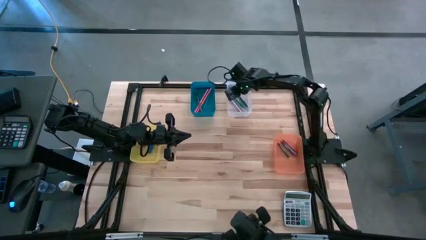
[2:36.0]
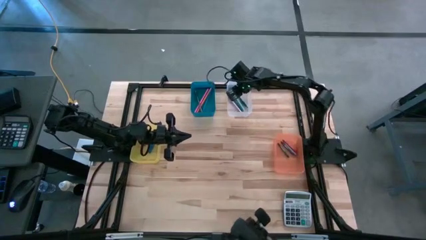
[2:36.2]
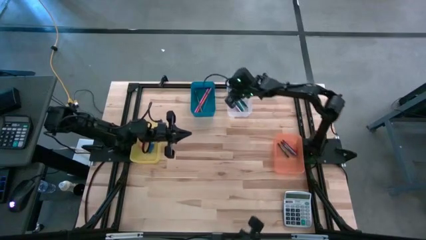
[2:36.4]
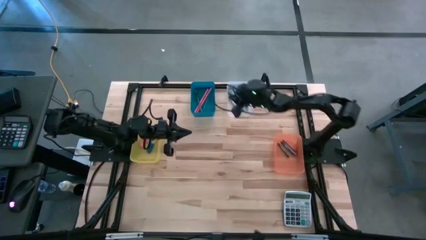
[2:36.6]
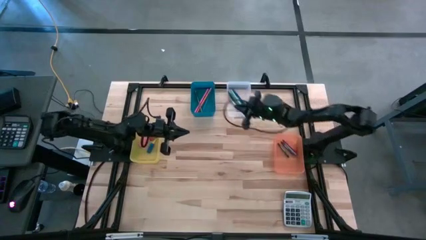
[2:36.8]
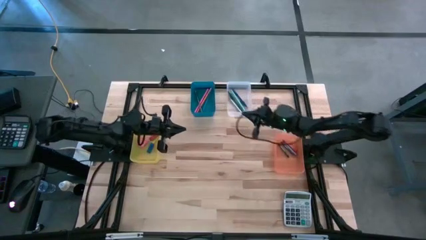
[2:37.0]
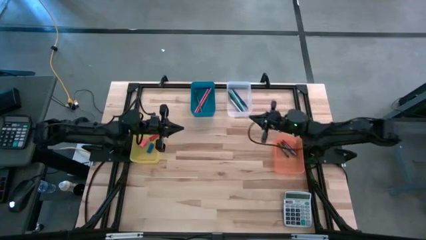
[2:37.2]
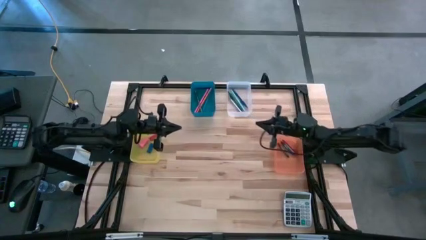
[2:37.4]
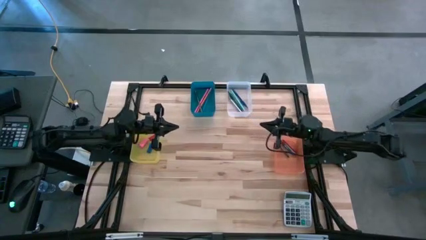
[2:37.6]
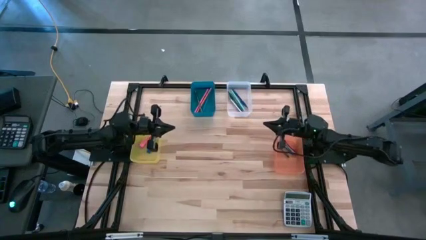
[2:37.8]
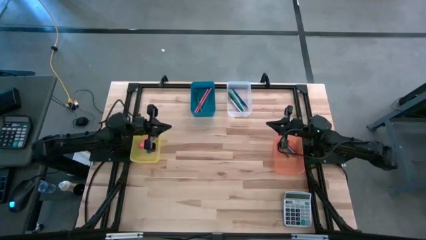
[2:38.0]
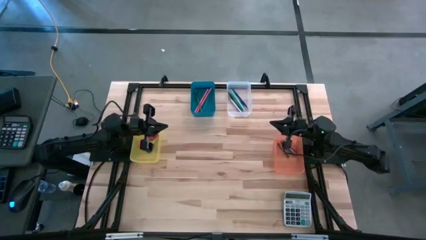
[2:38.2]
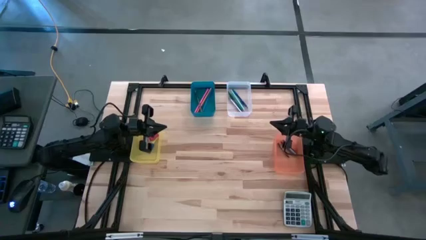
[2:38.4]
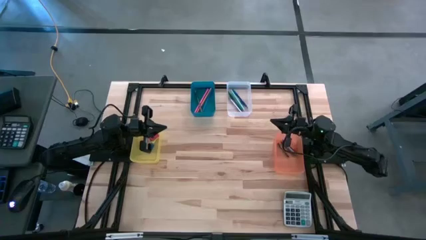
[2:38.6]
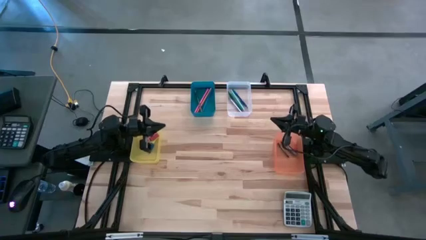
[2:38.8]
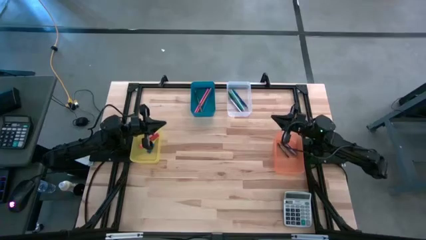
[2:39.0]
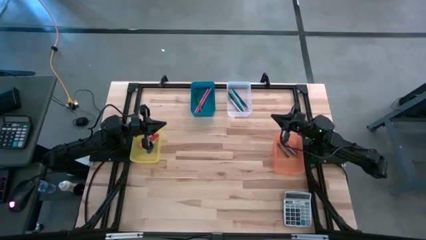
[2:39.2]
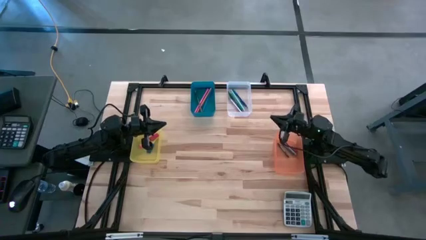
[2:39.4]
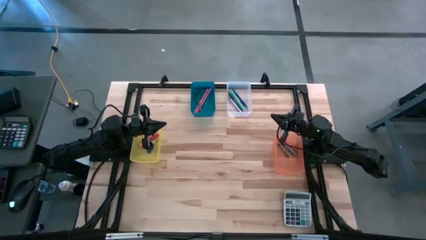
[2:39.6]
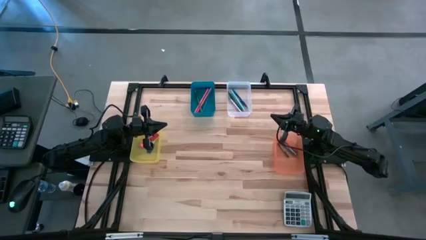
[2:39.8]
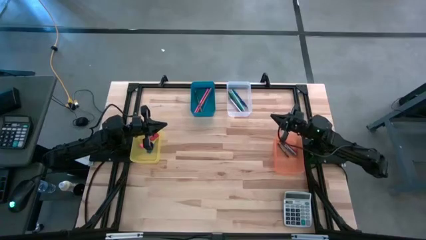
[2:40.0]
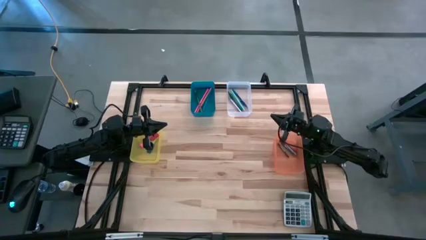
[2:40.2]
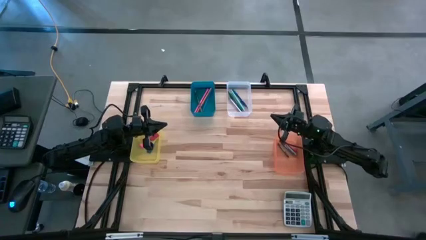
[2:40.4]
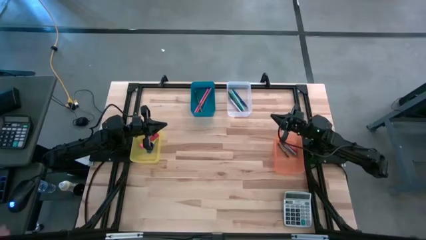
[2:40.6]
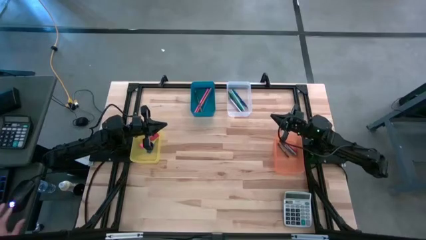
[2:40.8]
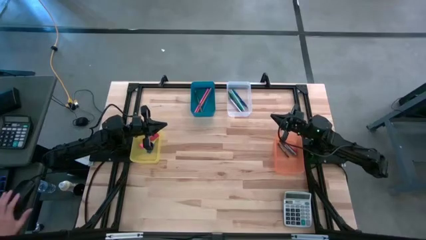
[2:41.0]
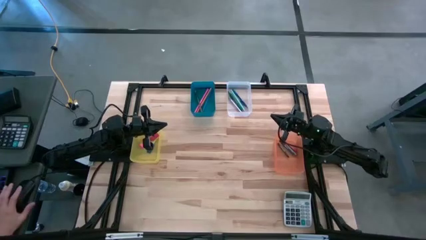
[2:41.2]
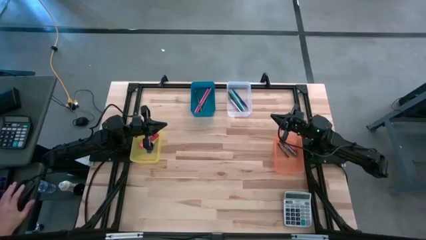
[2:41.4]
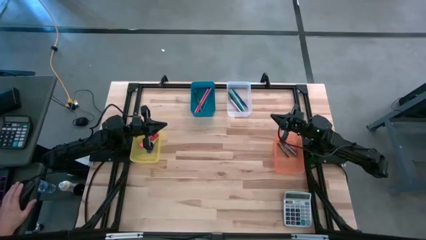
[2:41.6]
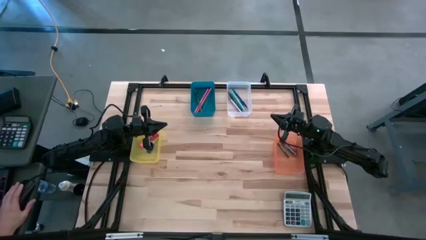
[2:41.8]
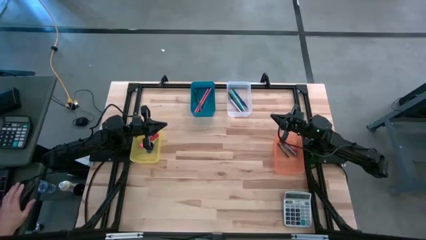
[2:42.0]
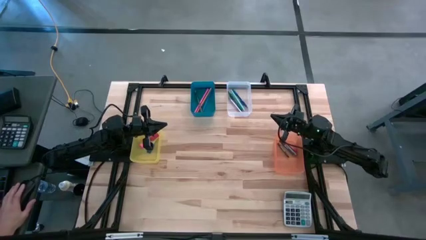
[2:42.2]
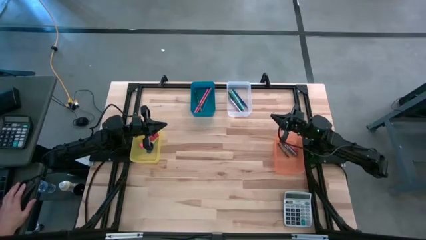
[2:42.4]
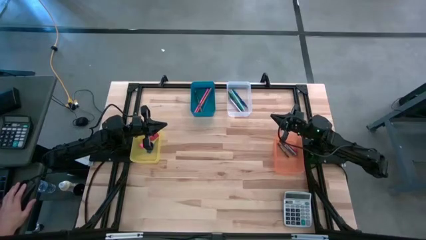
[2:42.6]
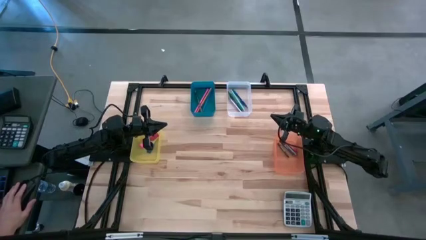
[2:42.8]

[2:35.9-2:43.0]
Task: Sort crayons/erasers/pens/pencils in bins
Return to Home Position

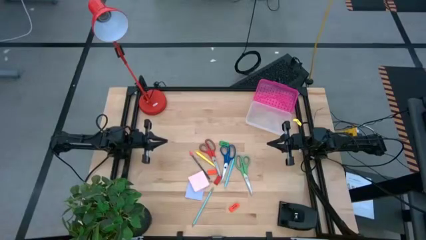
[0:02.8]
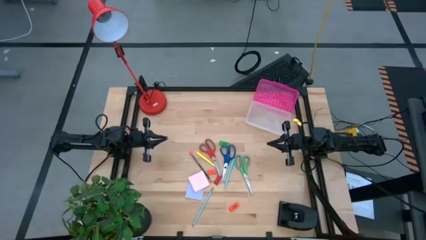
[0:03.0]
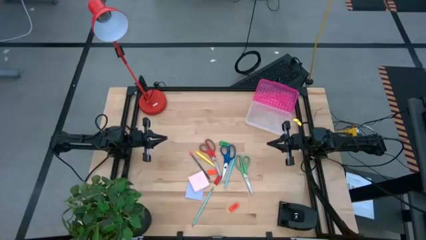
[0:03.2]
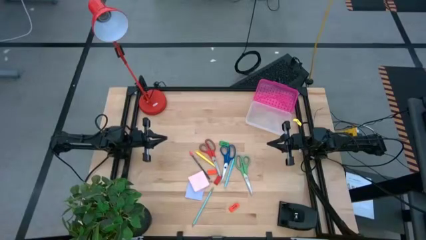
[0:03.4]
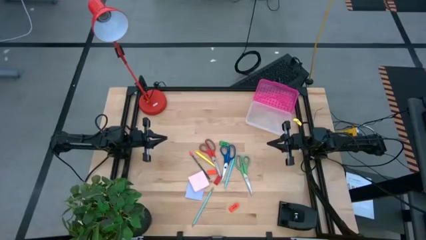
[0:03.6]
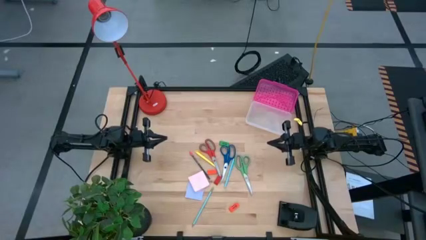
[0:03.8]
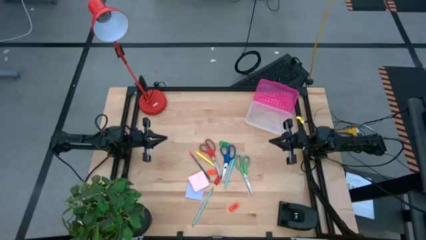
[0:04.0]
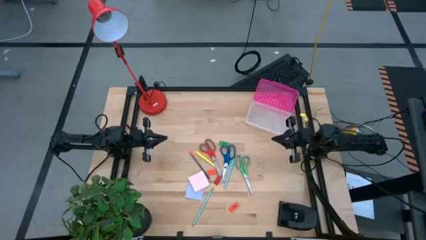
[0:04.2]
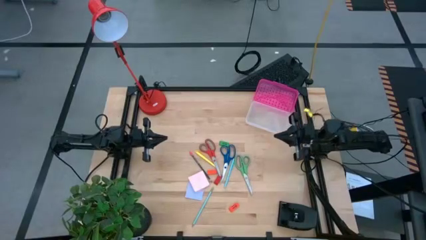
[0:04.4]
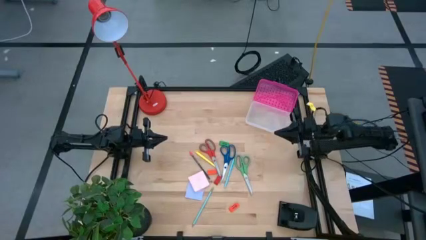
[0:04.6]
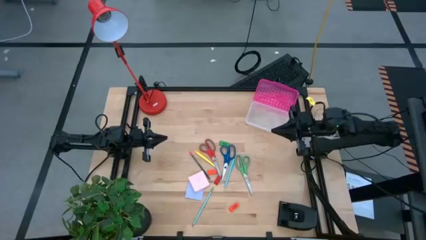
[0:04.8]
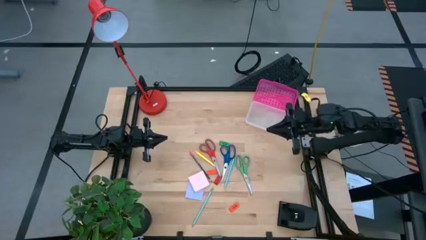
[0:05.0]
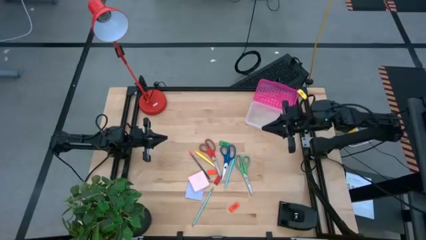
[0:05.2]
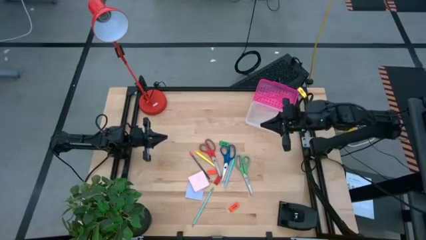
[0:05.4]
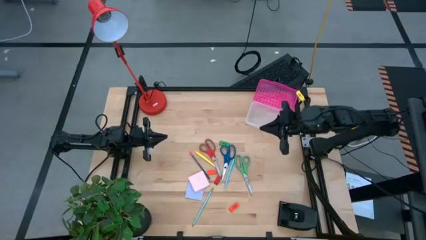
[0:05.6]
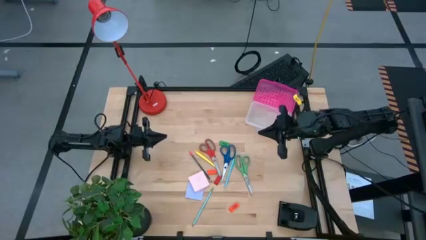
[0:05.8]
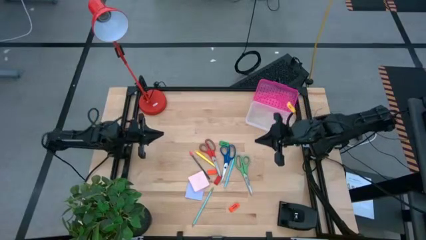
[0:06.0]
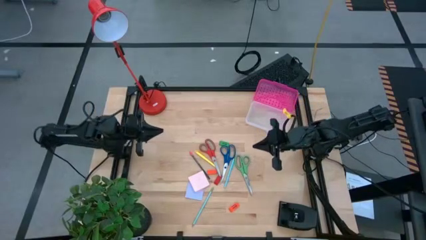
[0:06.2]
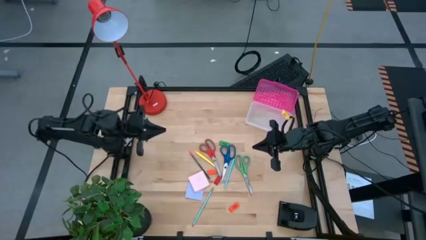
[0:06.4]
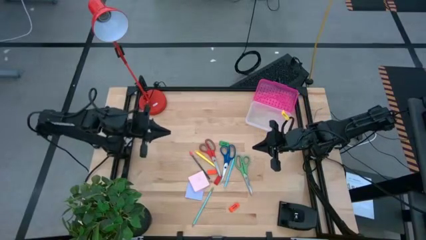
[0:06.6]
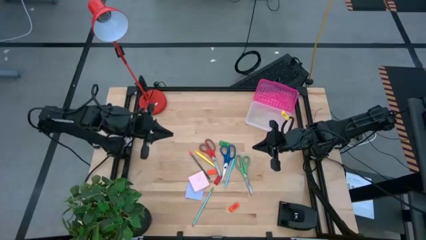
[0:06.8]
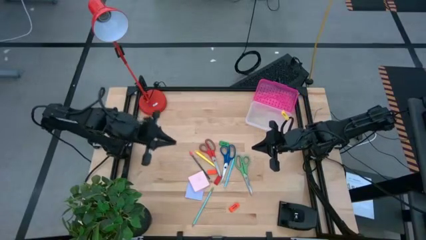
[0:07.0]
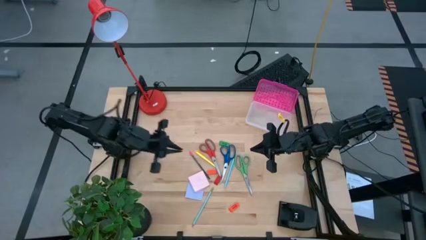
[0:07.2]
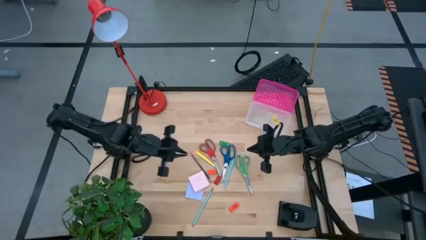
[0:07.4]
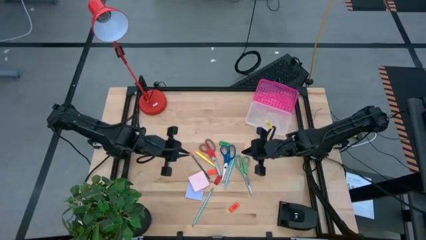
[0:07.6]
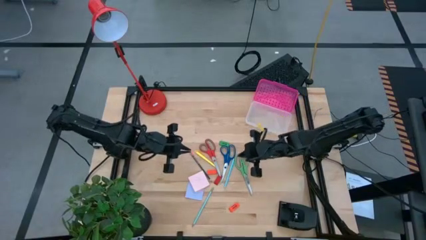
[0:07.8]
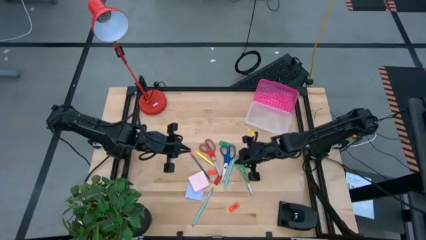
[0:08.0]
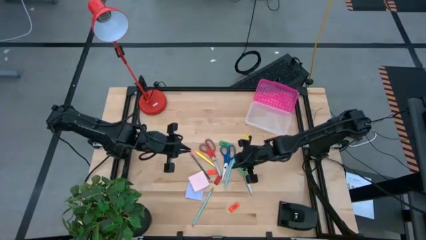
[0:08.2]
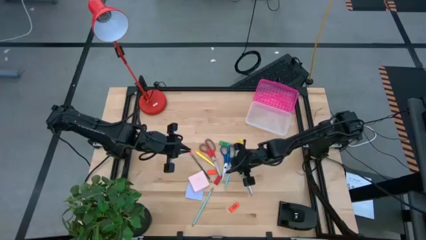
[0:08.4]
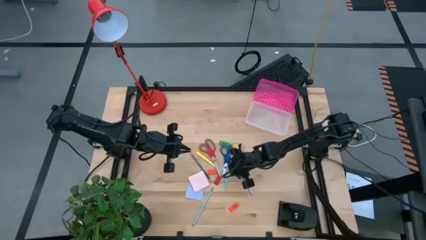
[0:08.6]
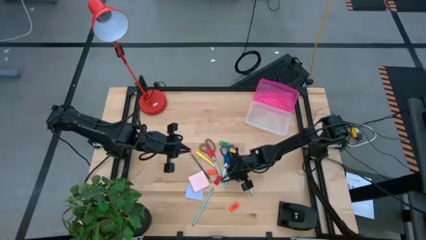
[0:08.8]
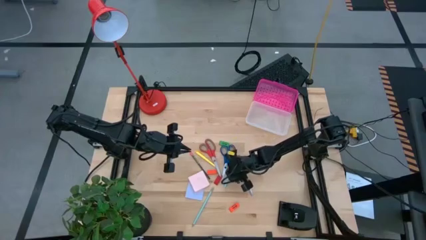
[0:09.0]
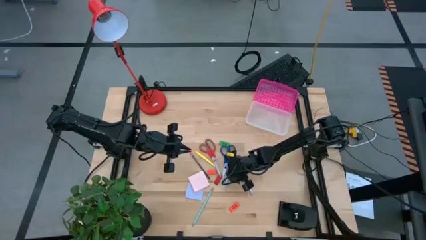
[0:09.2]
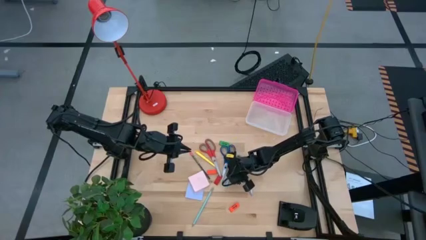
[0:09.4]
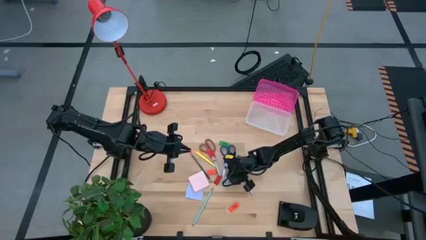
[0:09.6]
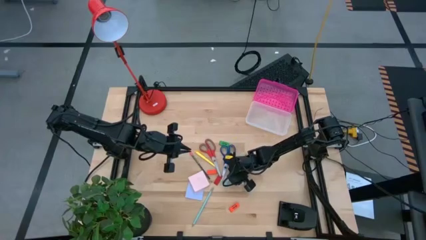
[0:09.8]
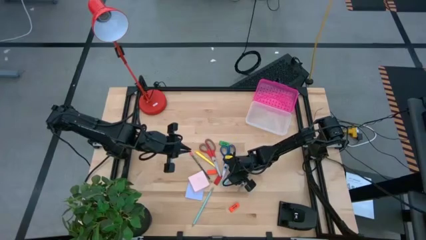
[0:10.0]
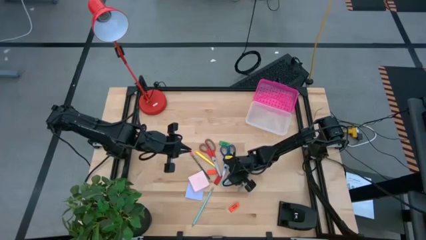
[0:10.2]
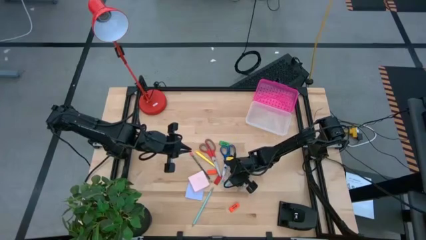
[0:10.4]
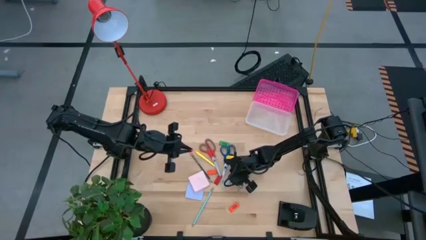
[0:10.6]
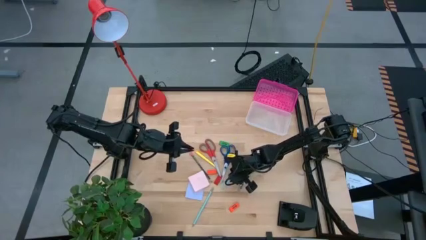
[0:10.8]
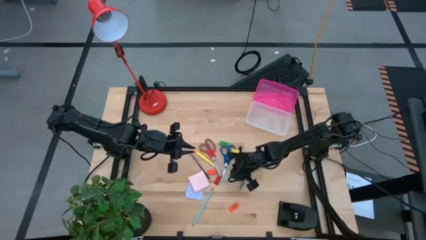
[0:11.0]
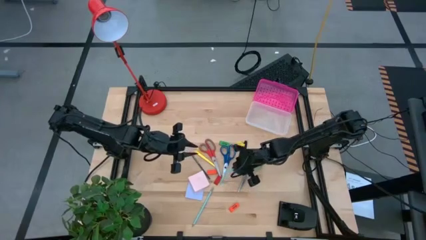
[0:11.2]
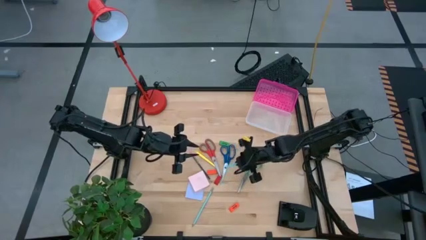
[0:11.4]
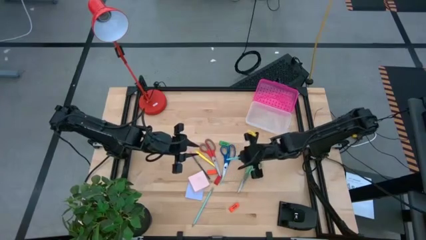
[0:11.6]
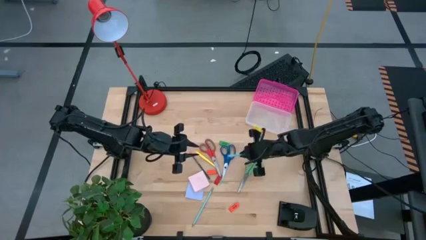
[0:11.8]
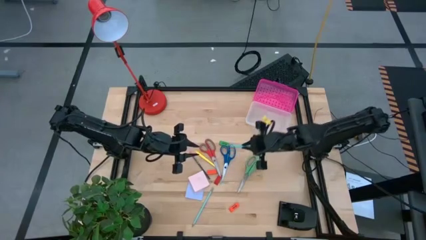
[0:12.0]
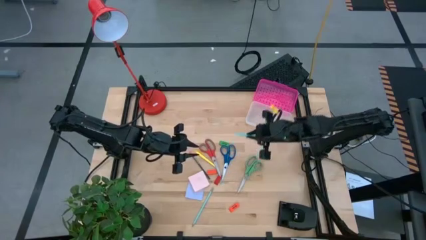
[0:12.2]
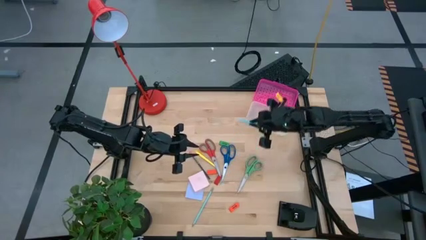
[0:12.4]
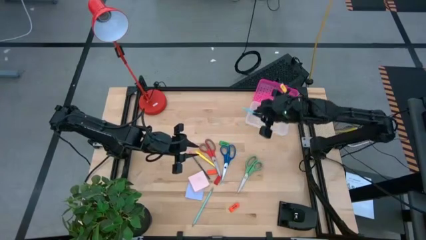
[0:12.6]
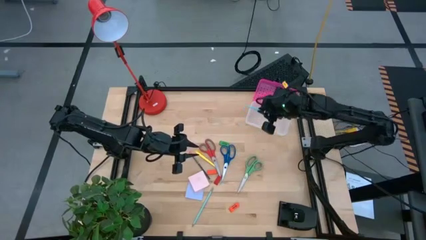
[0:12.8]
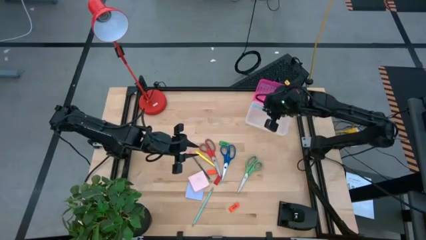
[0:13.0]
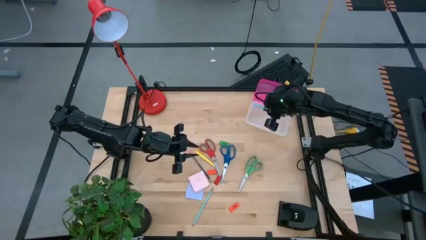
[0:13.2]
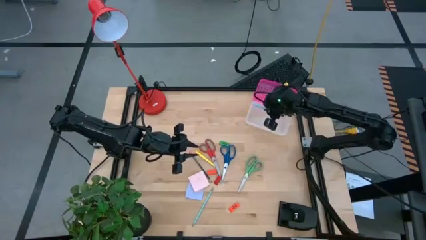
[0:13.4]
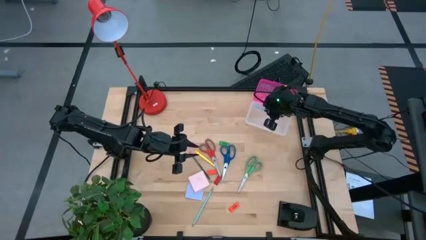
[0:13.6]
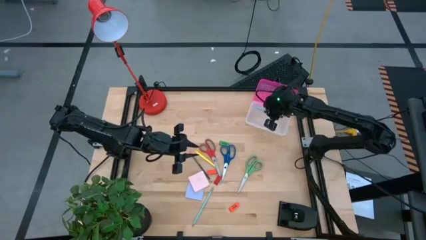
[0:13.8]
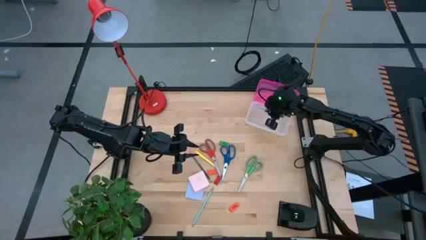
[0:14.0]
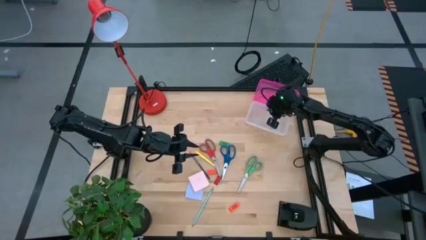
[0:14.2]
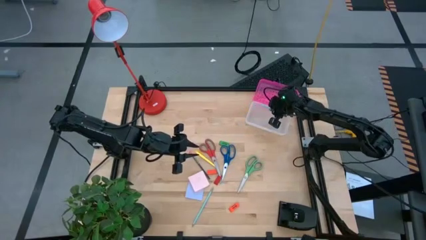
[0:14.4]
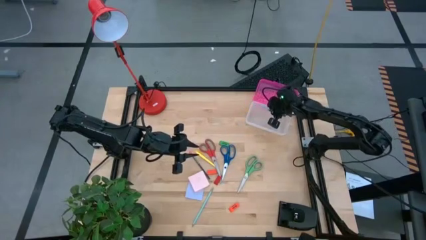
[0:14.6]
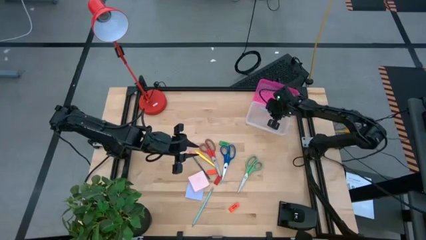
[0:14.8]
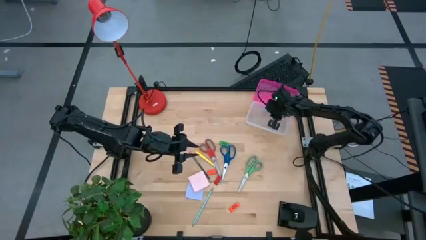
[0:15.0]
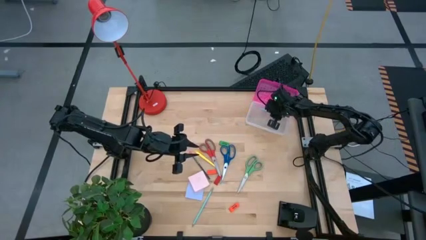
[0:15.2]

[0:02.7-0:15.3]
Task: Pack school essentials
Put the blue pen into the supply box
